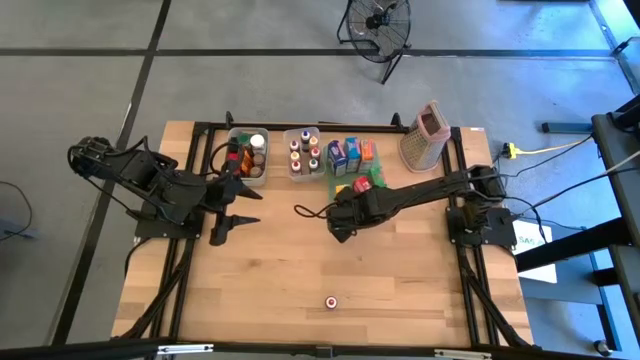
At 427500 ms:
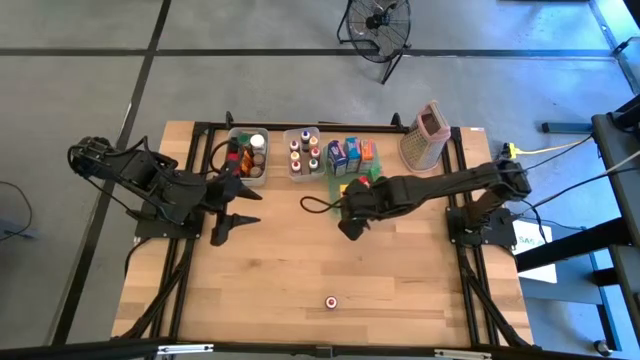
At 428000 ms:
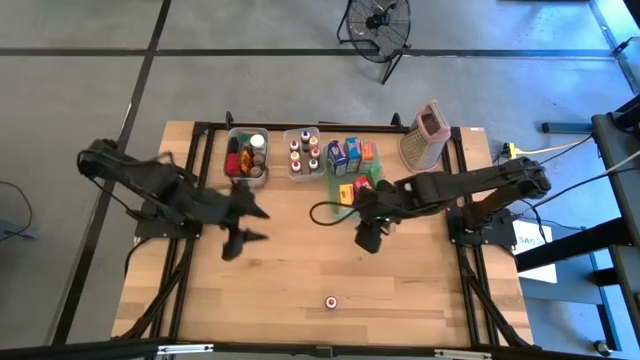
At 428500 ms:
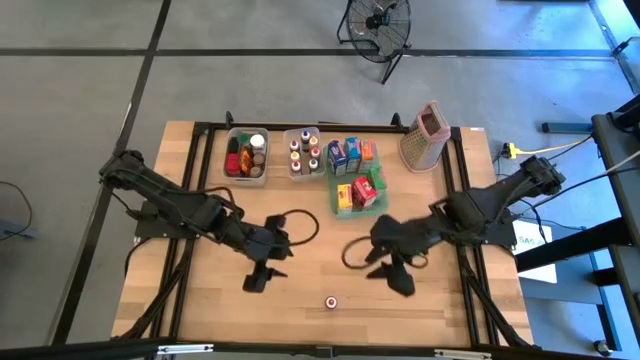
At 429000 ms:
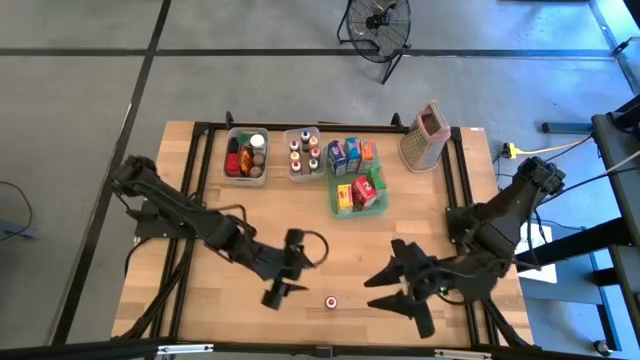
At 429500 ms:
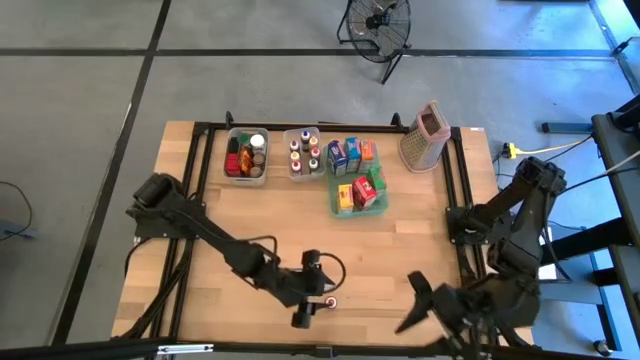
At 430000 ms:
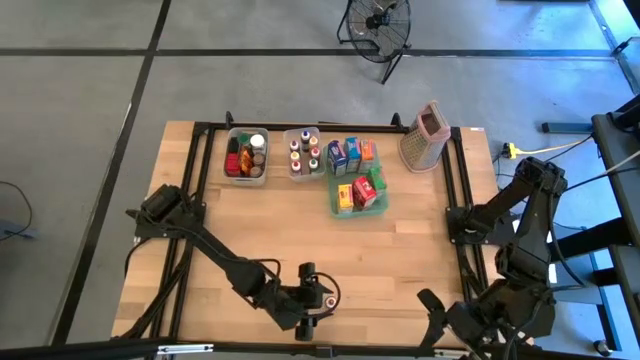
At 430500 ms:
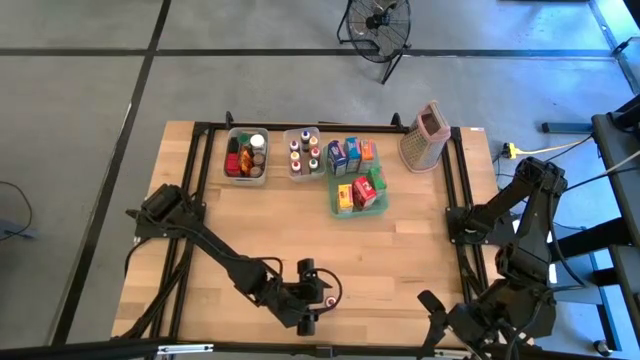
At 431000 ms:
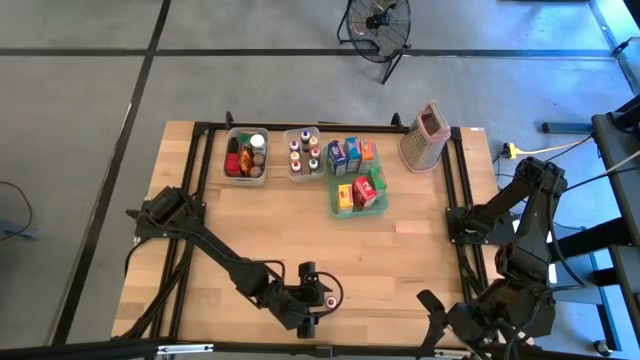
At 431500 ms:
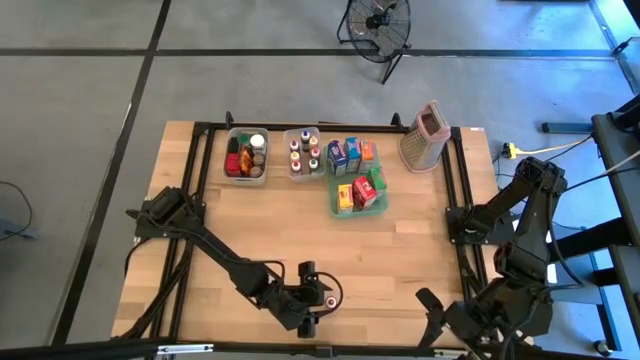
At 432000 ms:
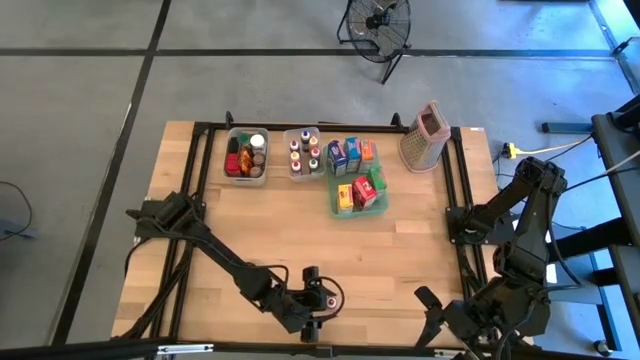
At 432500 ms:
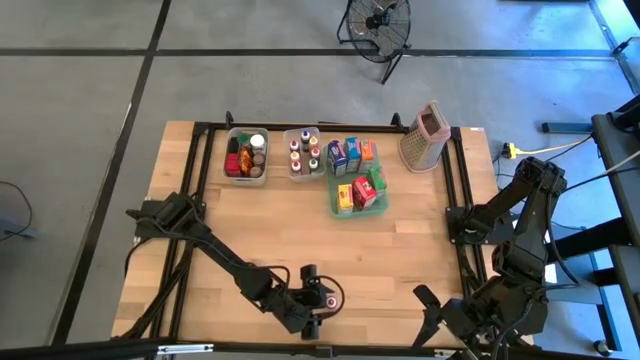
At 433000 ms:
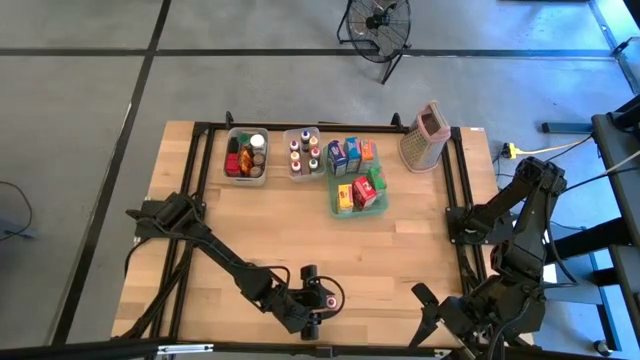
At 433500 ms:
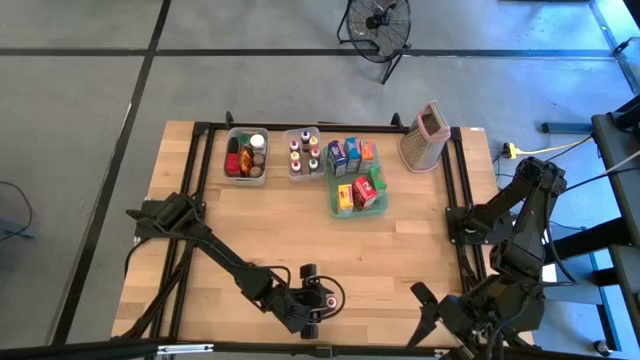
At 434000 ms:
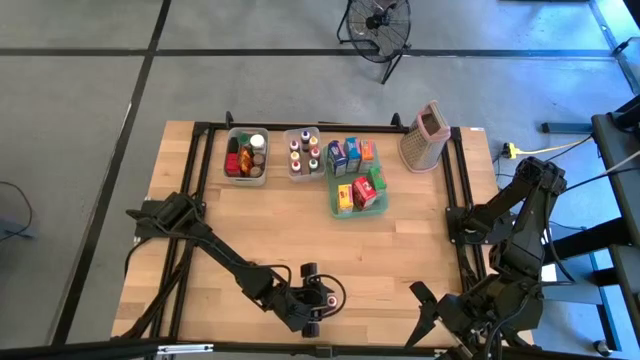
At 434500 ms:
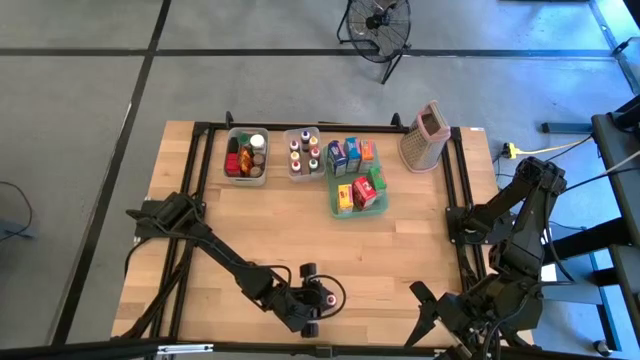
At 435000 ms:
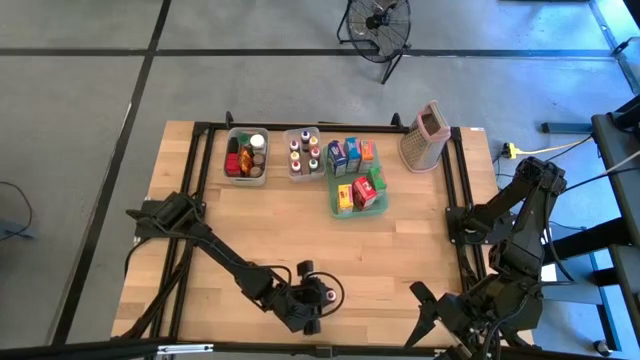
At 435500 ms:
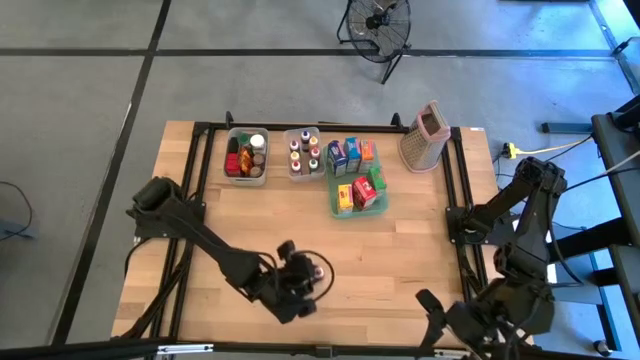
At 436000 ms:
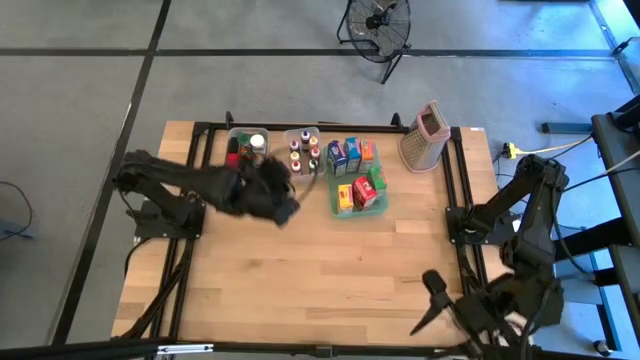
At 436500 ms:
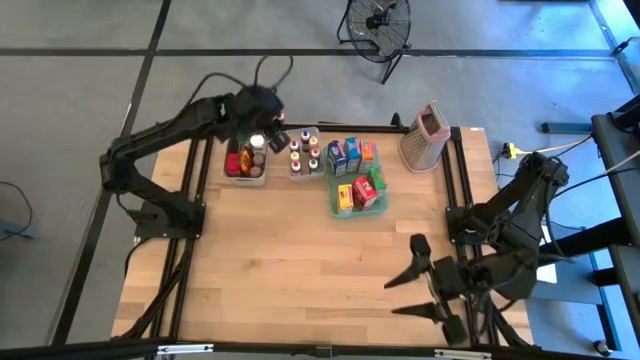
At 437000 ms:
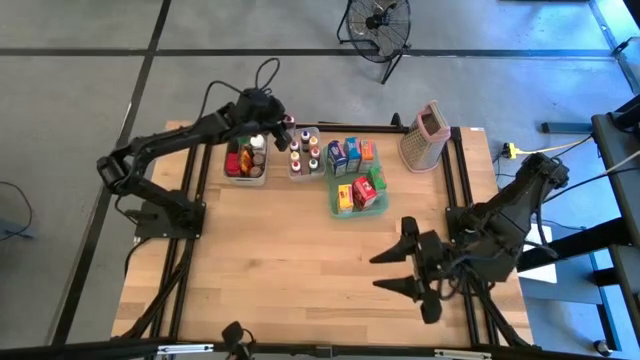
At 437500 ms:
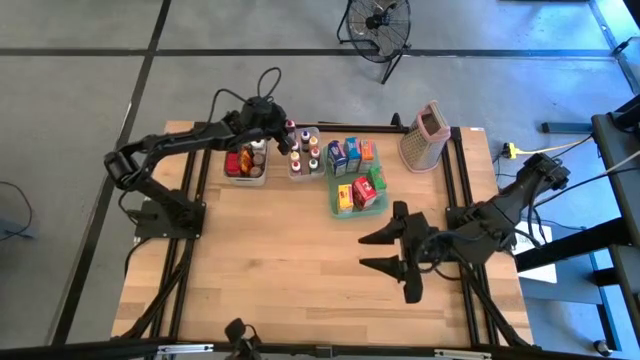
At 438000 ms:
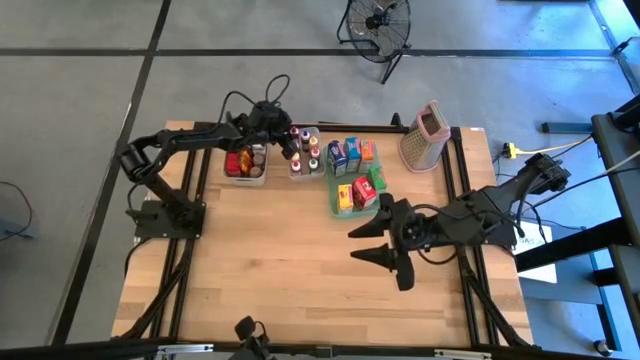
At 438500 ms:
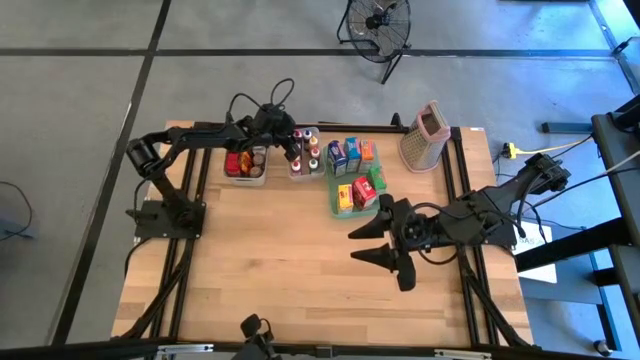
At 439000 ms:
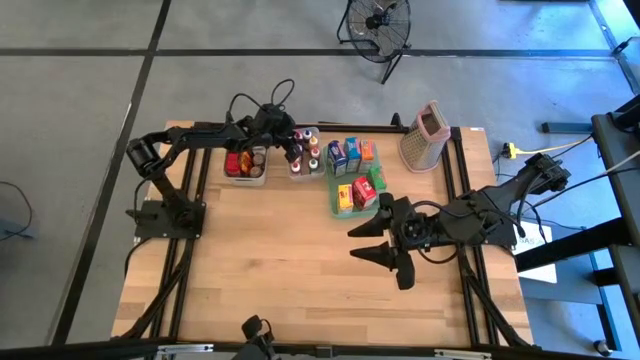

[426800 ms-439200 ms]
Task: Pick & Place Kitchen Items
Put the red food coloring bottle into the transparent bin

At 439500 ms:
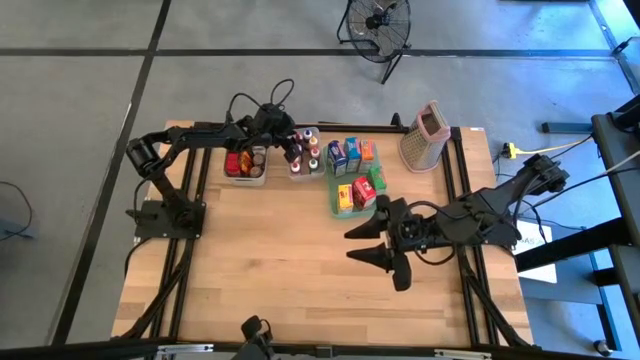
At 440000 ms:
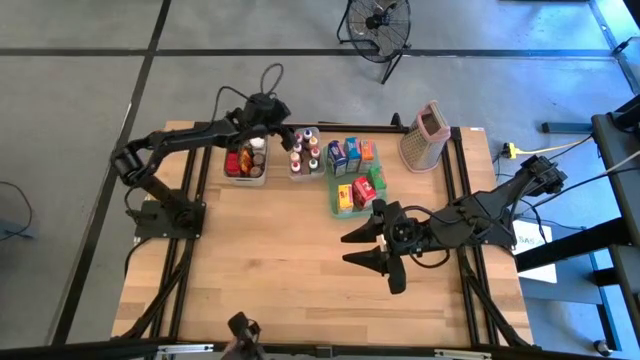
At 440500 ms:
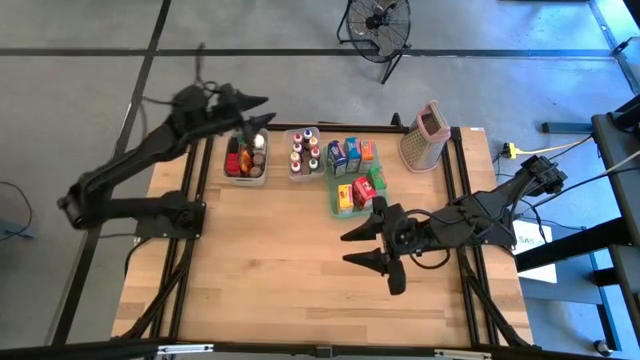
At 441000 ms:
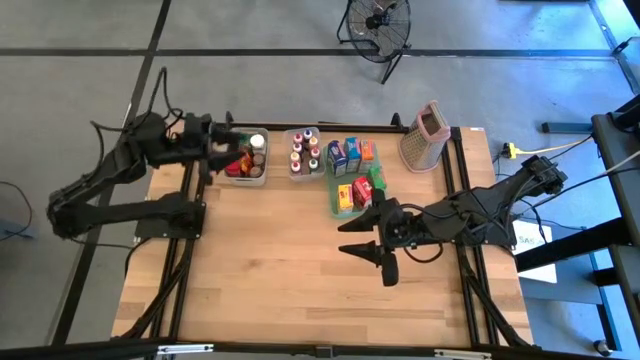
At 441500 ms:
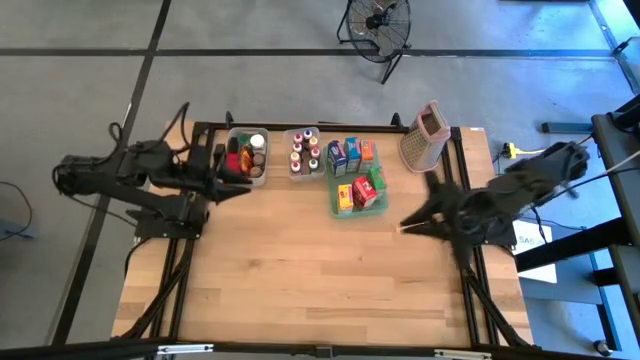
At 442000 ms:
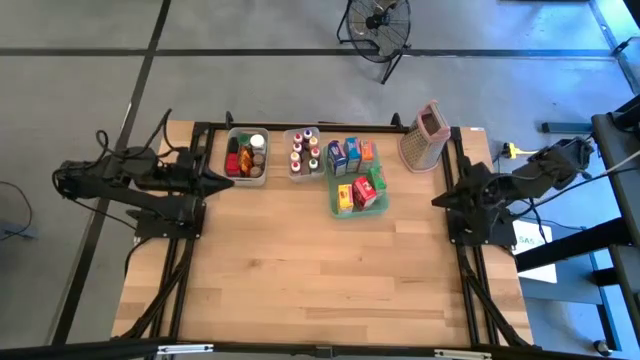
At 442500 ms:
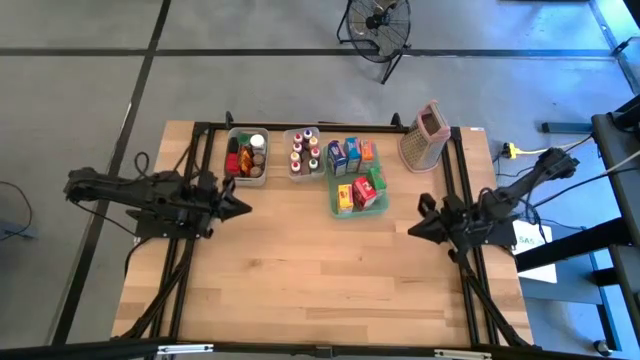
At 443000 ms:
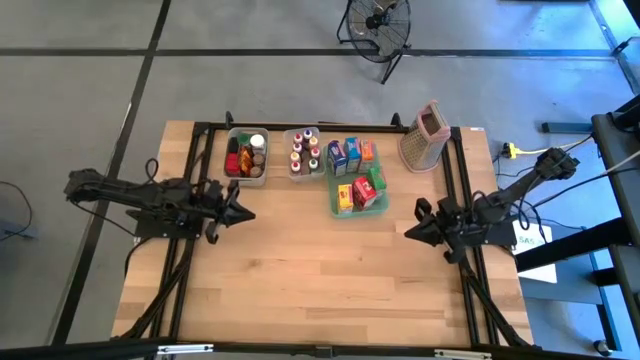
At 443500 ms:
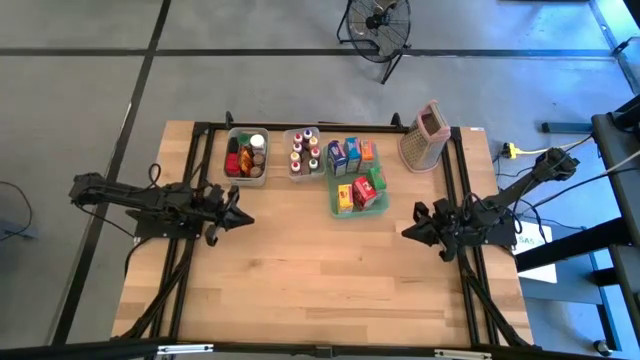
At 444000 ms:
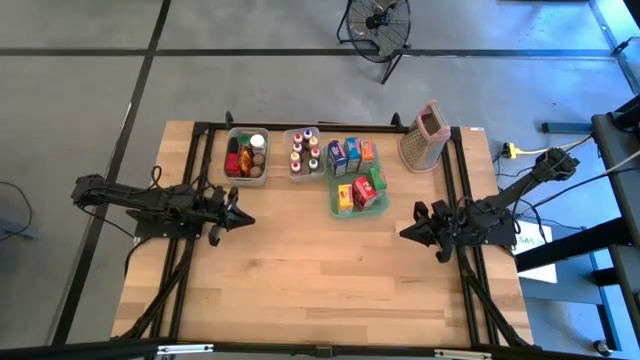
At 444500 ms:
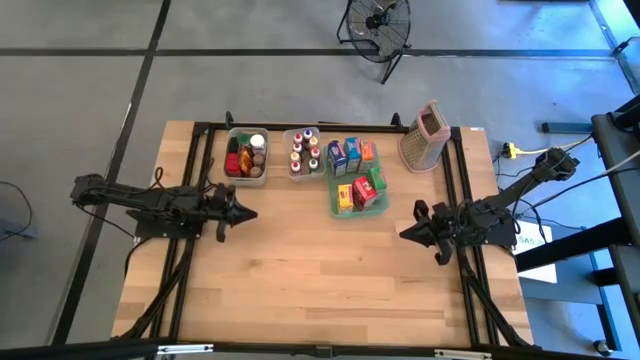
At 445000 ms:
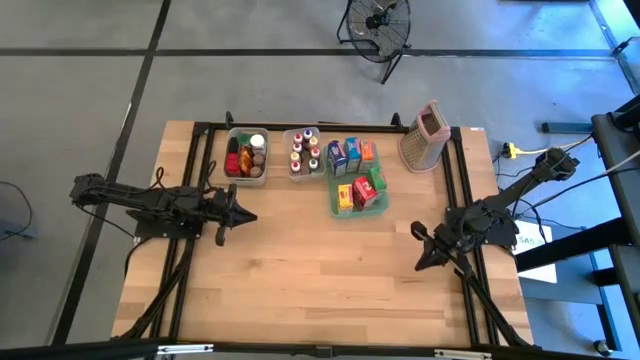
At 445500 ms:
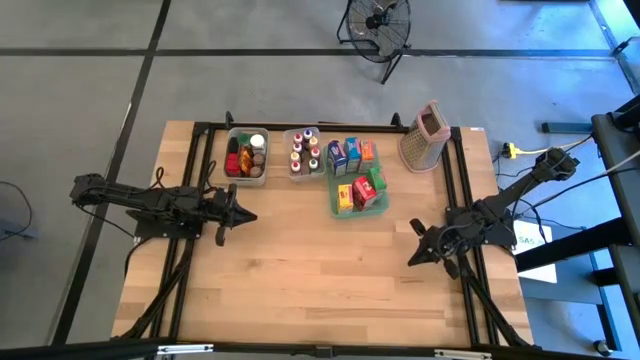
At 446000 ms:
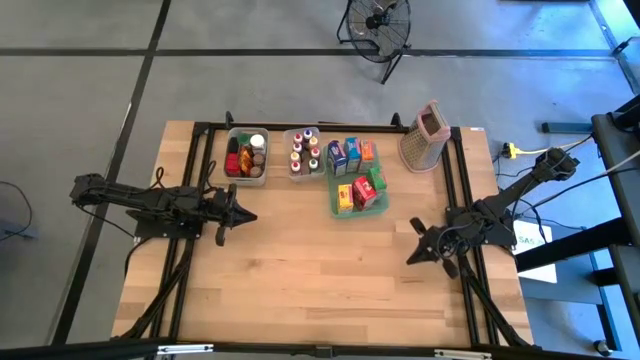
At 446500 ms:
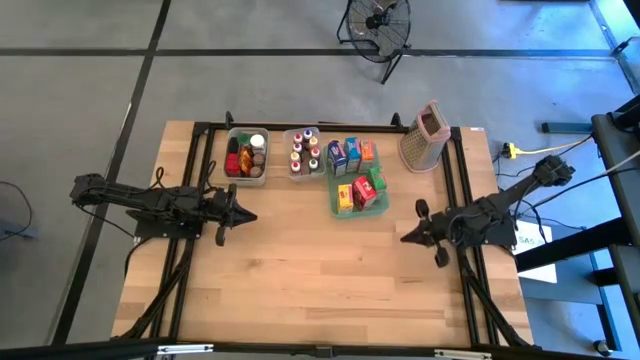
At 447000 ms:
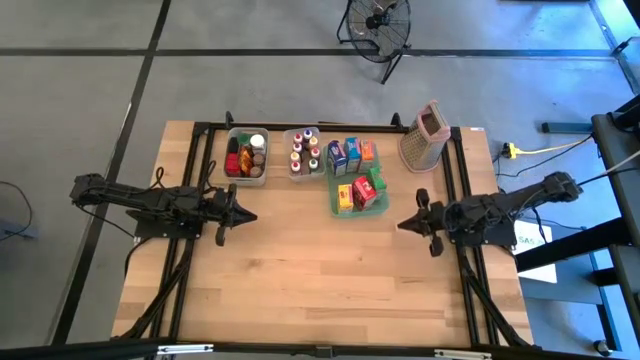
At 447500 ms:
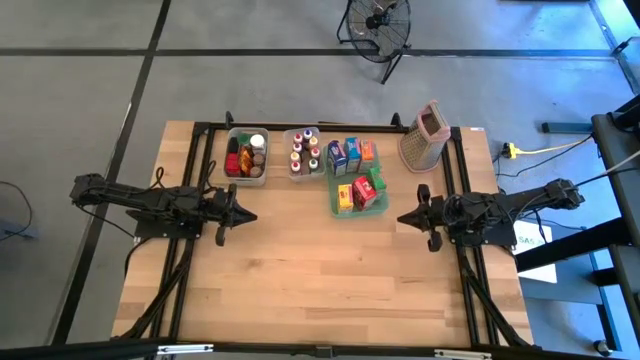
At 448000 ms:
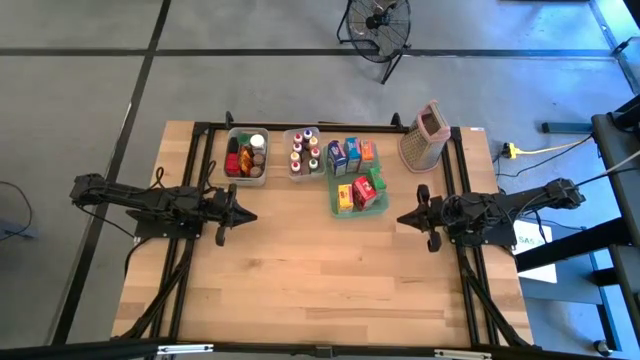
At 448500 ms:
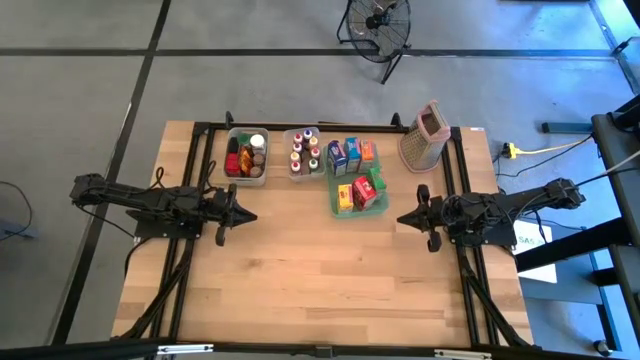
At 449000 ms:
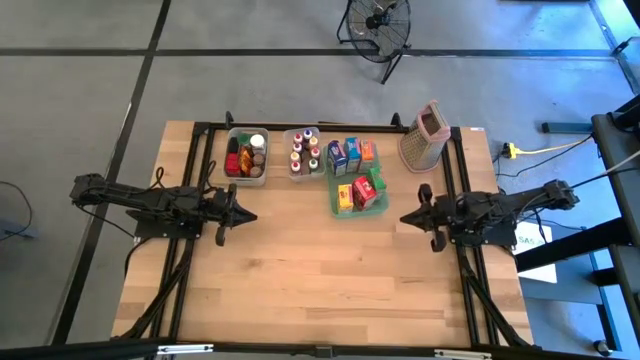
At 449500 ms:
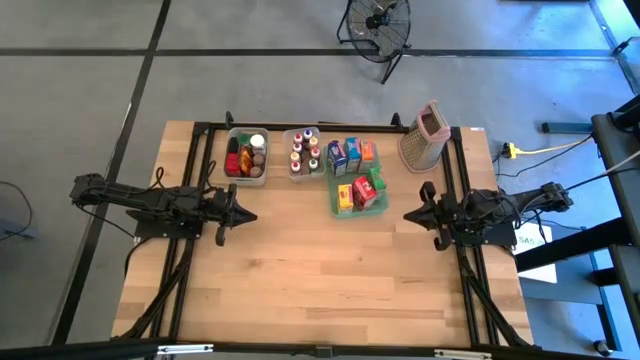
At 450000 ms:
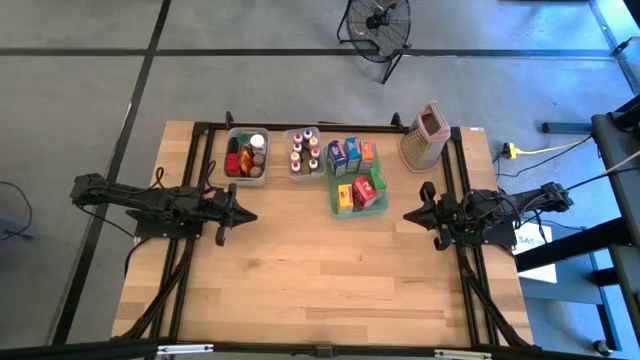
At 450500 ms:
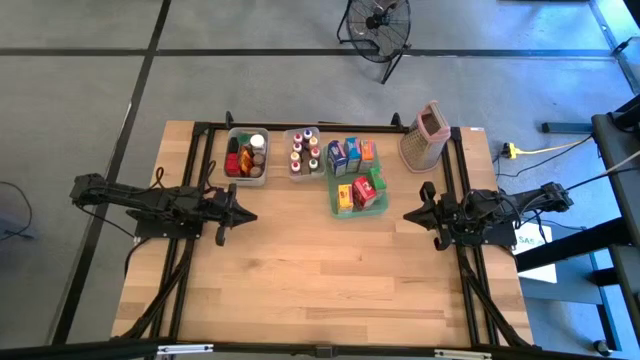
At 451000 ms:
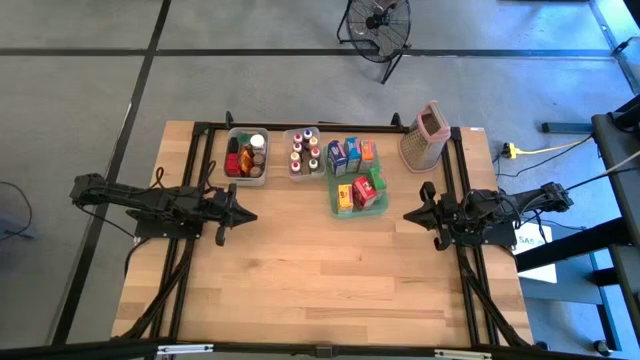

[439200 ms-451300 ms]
Return to Home Position
